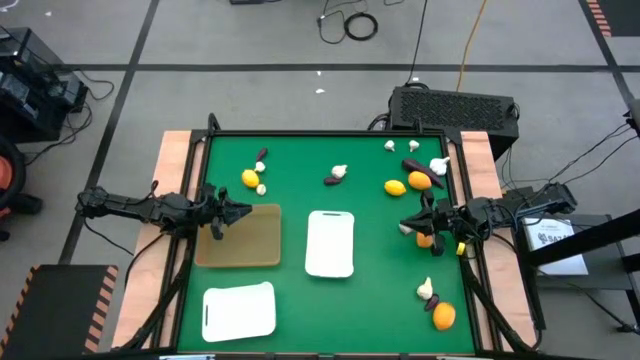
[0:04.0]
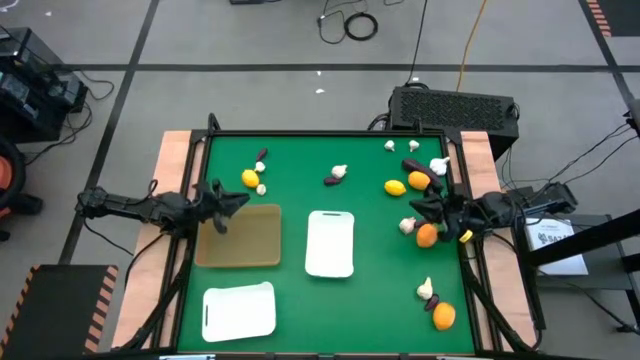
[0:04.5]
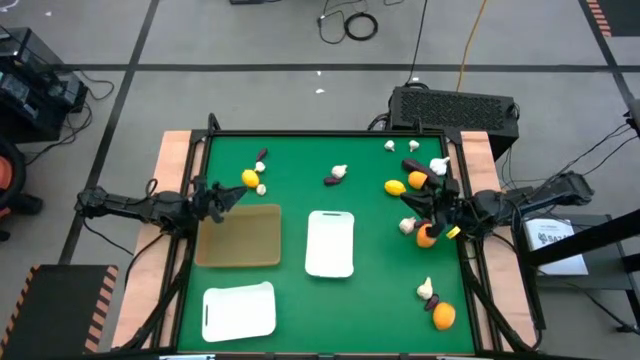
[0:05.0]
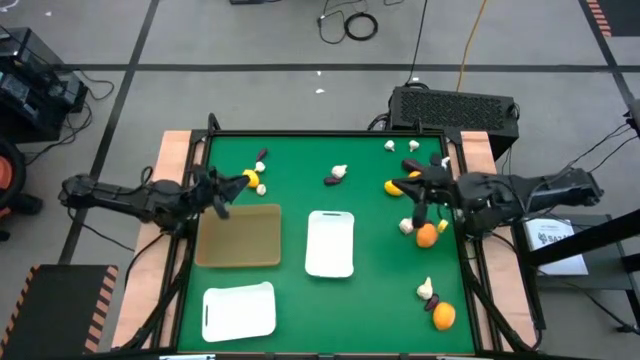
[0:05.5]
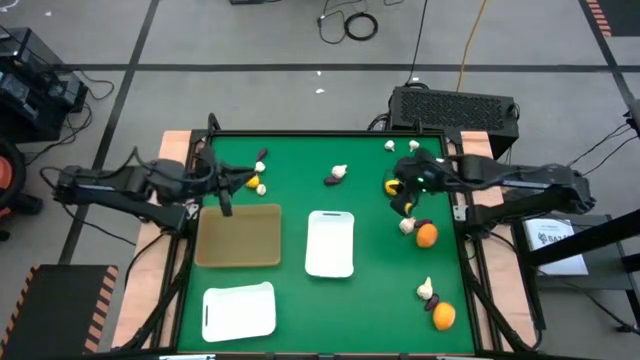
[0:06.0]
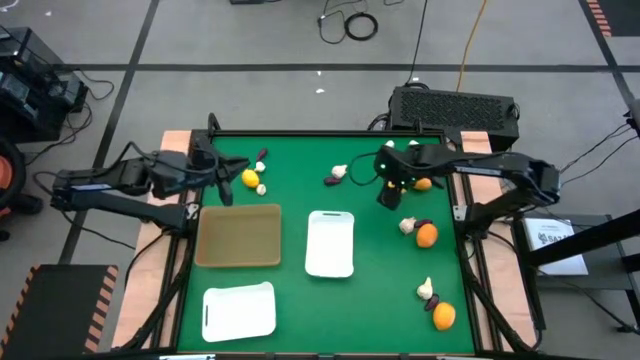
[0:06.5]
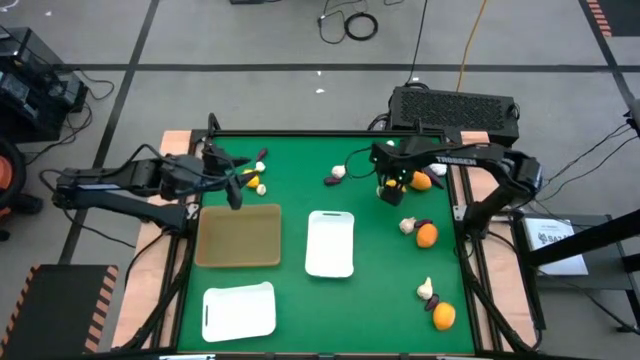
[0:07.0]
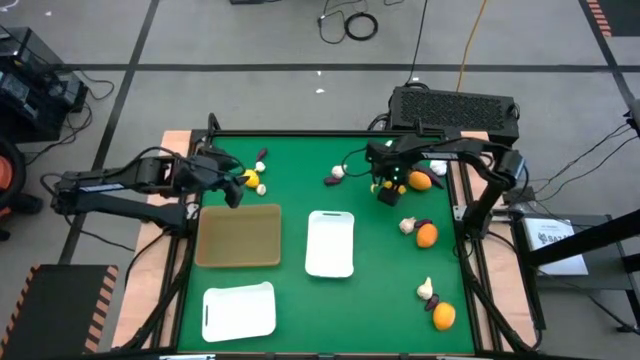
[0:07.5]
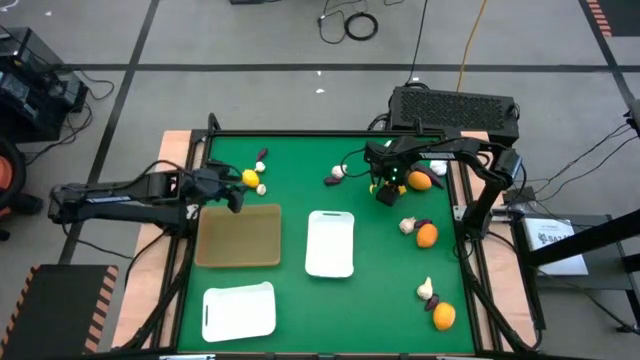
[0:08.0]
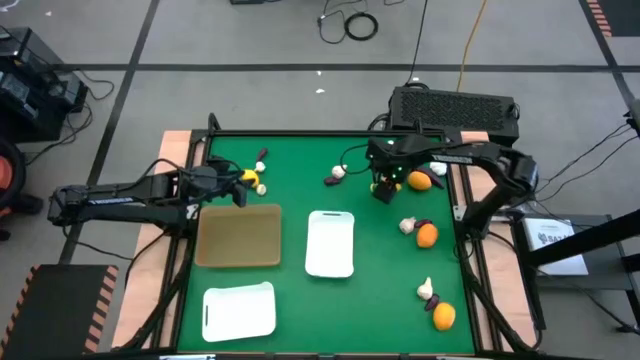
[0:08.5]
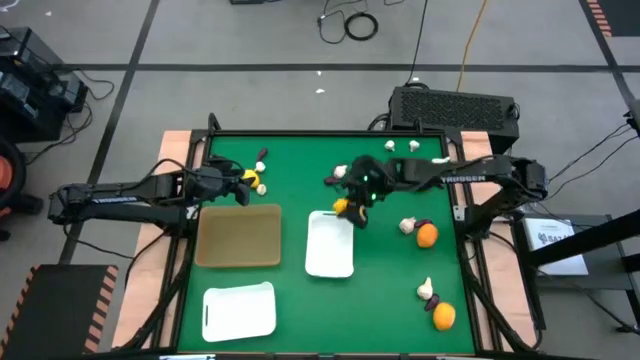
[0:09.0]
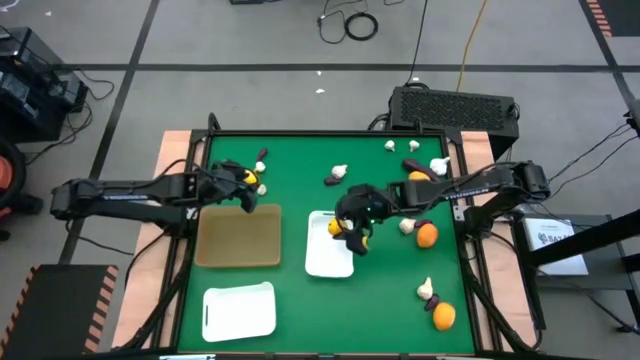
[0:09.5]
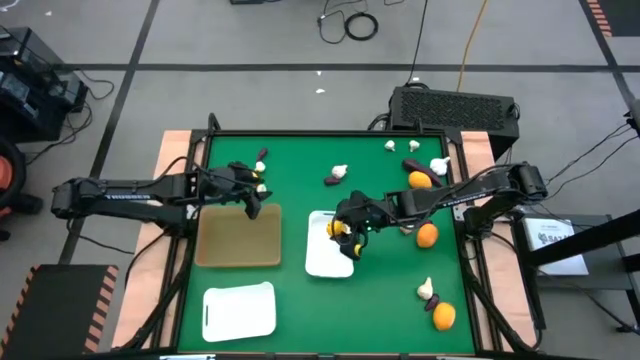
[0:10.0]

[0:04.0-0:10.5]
Task: Sort produce into baskets
Put the yellow lemon into the top white bin

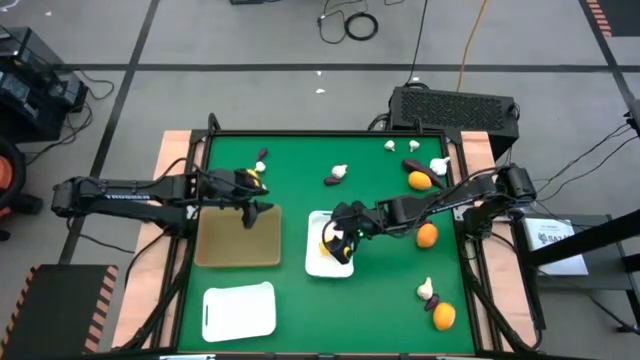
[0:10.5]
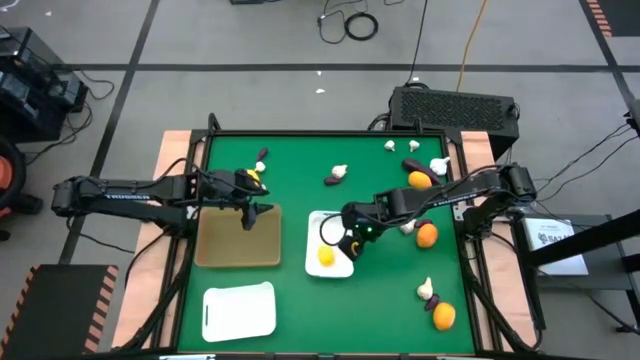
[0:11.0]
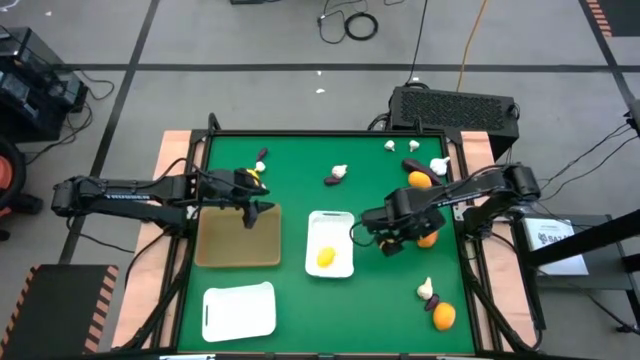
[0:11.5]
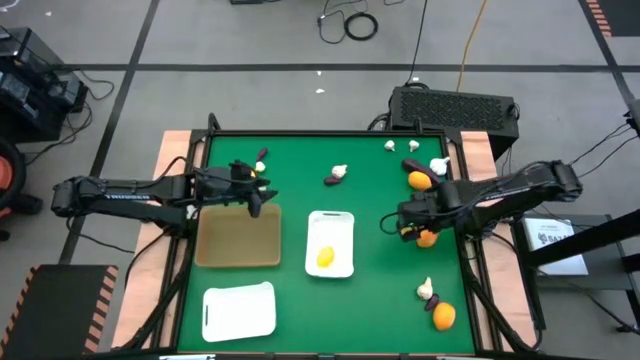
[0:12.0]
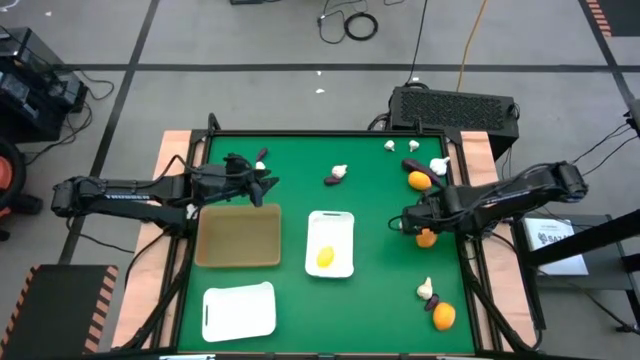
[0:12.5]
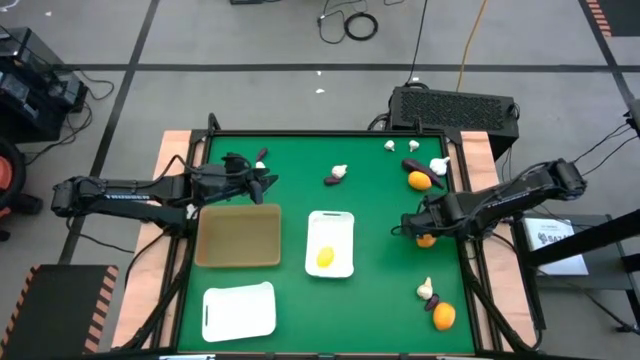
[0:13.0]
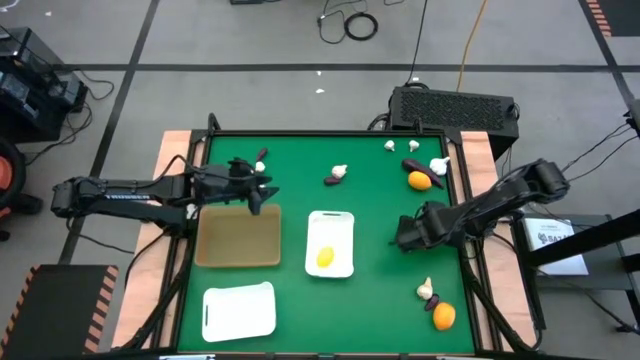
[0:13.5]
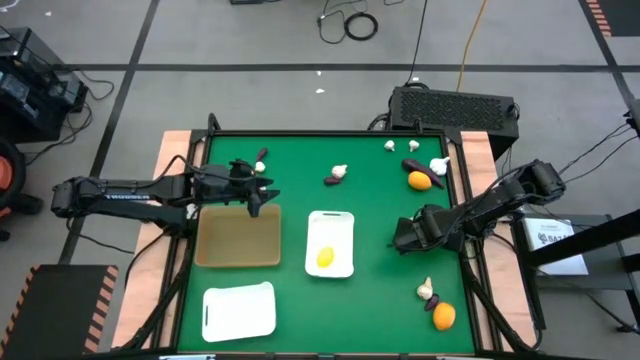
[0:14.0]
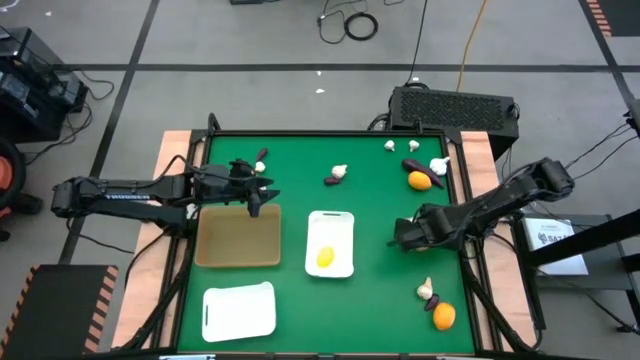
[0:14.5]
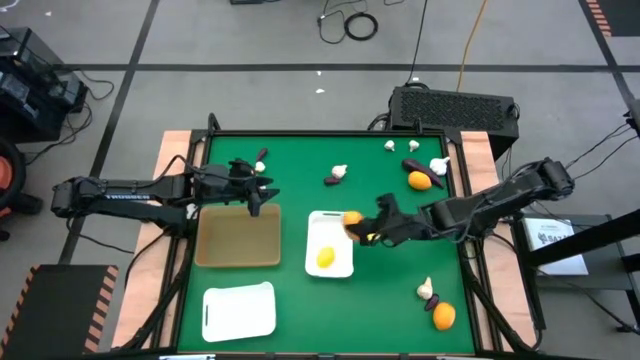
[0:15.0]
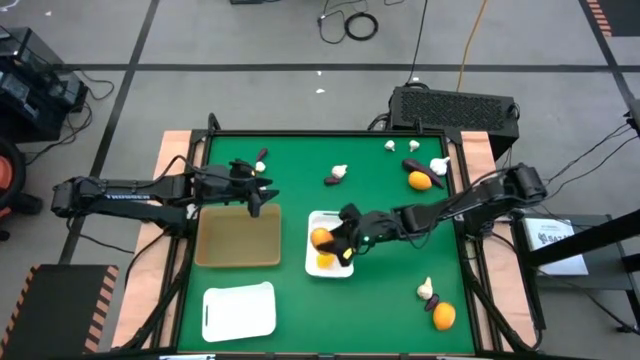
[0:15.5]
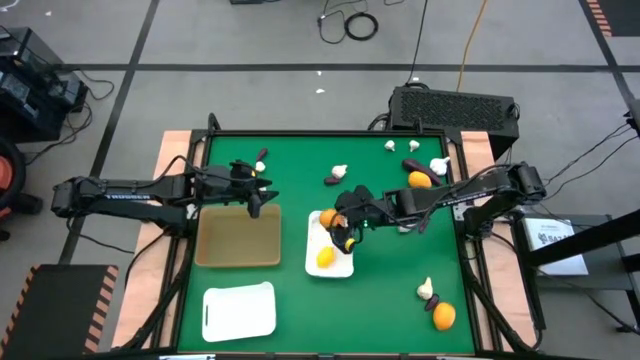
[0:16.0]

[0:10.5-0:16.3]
Put the yellow lemon into the top white bin

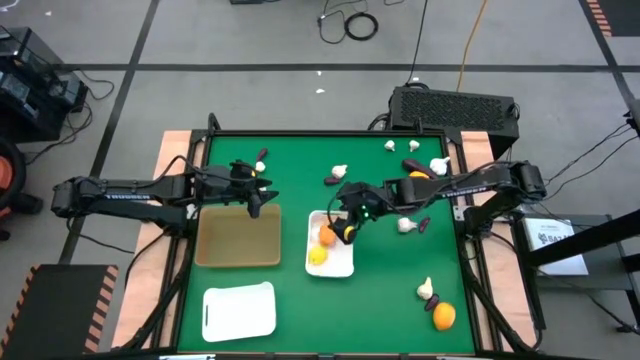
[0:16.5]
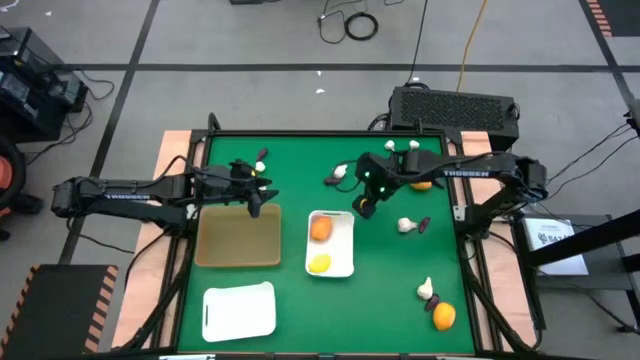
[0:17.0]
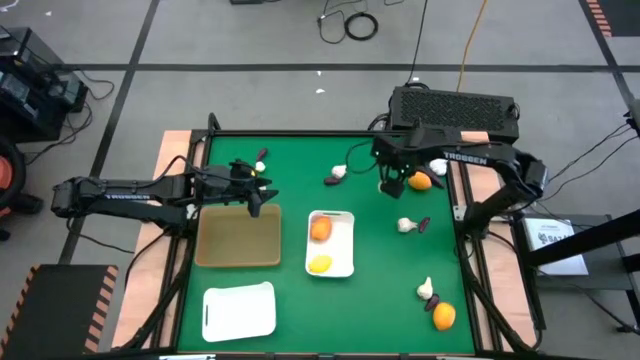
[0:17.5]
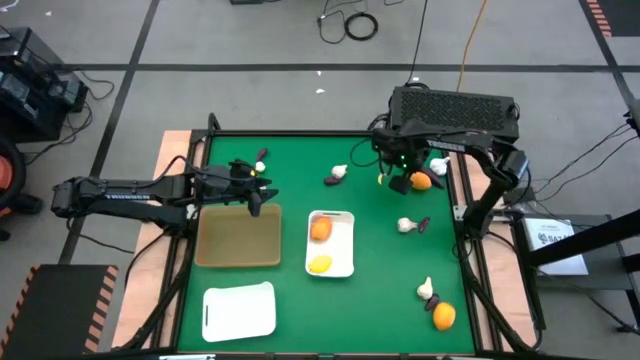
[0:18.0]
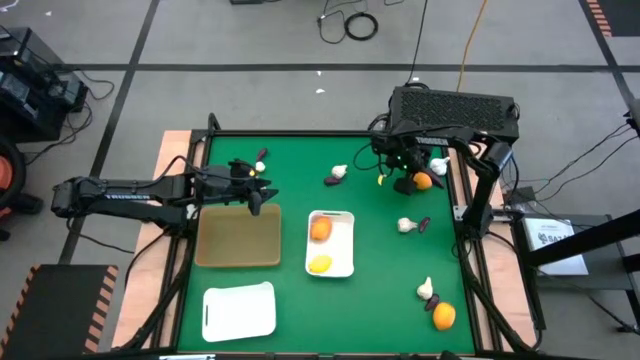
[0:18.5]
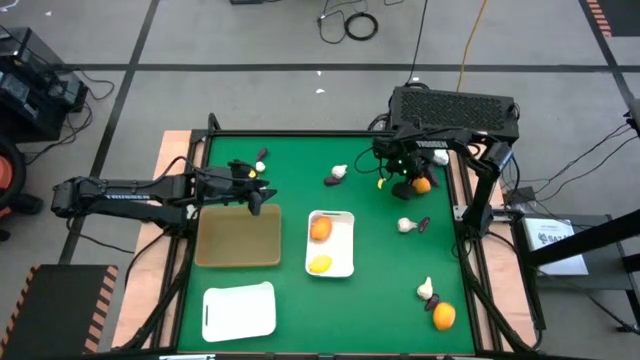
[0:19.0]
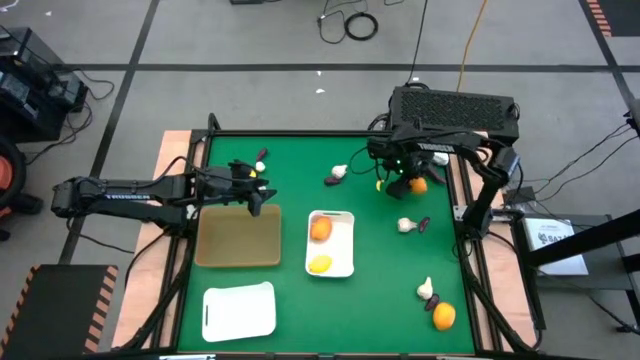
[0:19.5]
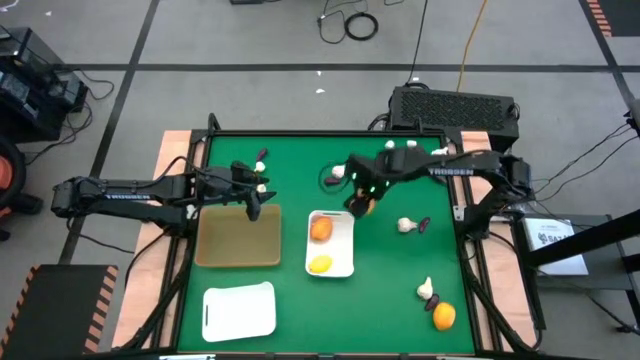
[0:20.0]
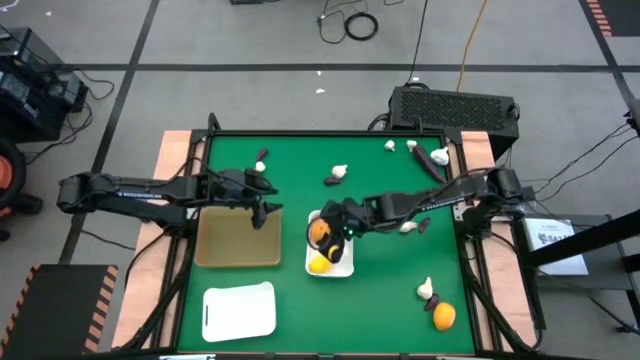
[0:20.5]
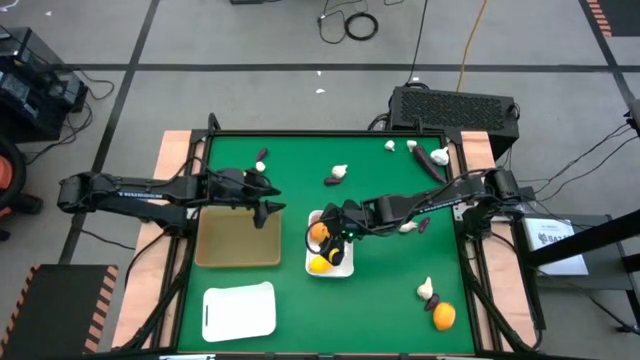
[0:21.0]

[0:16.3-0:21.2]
Put the yellow lemon into the top white bin

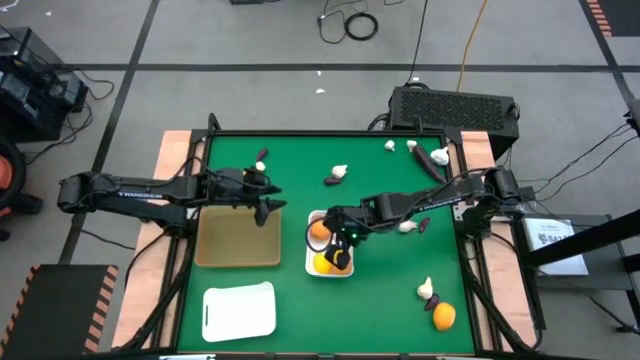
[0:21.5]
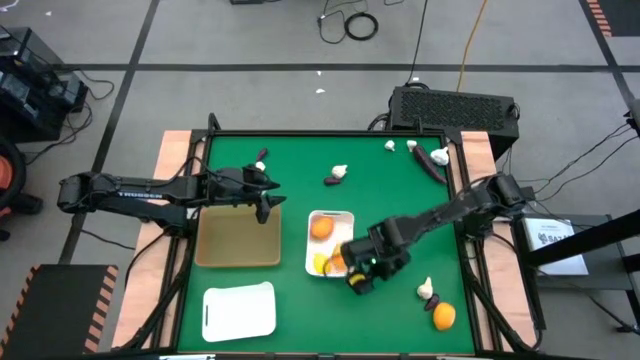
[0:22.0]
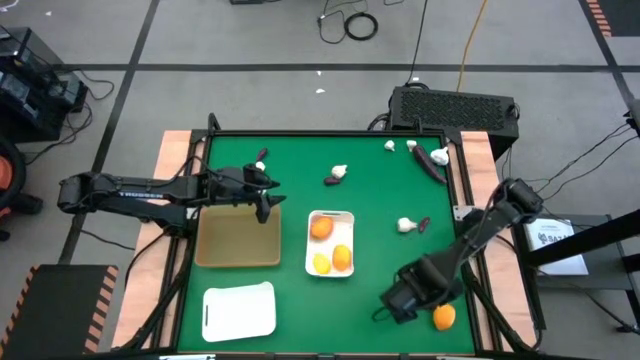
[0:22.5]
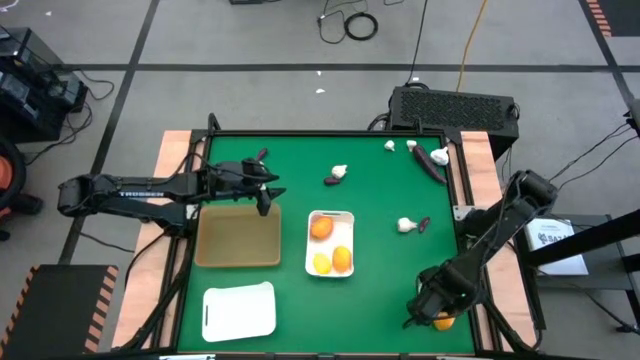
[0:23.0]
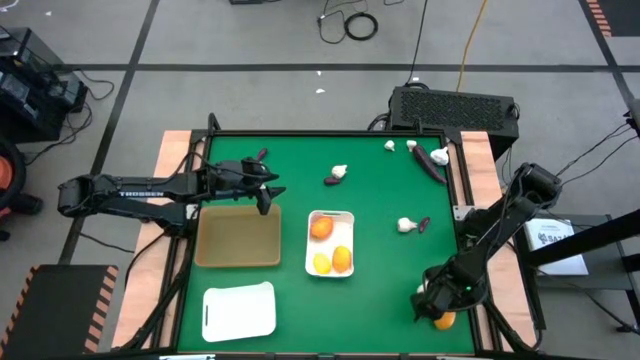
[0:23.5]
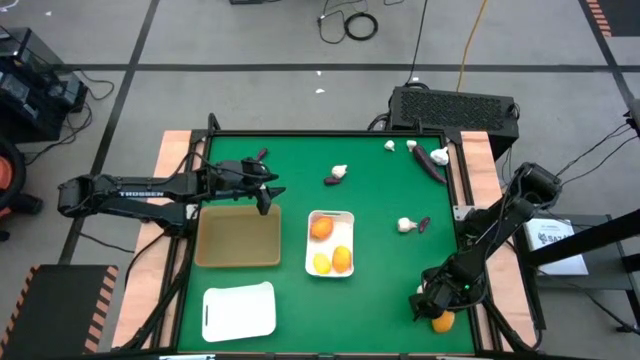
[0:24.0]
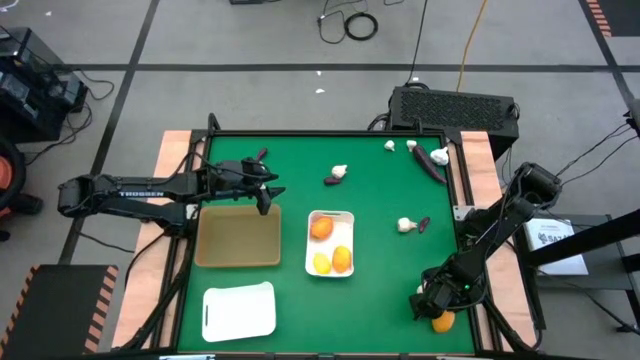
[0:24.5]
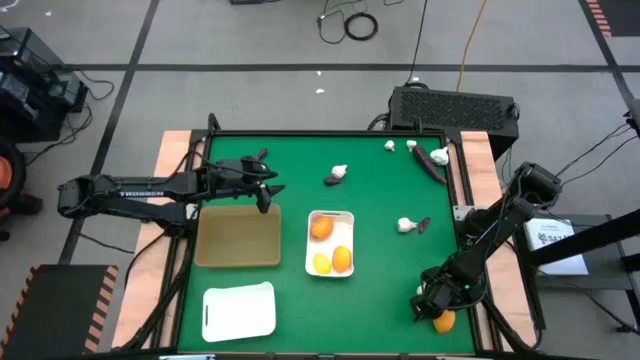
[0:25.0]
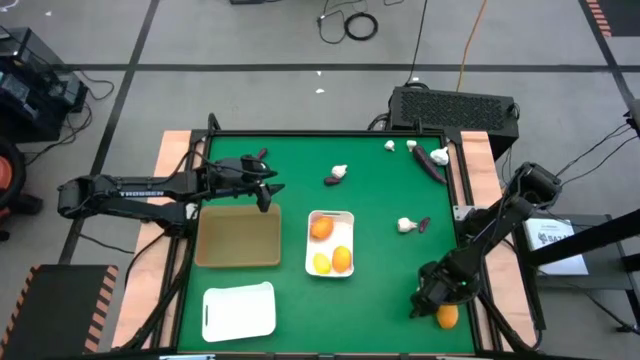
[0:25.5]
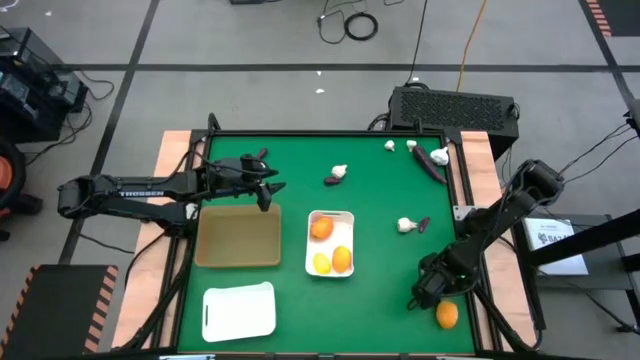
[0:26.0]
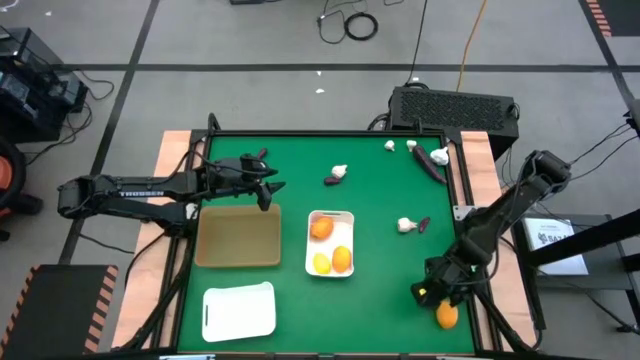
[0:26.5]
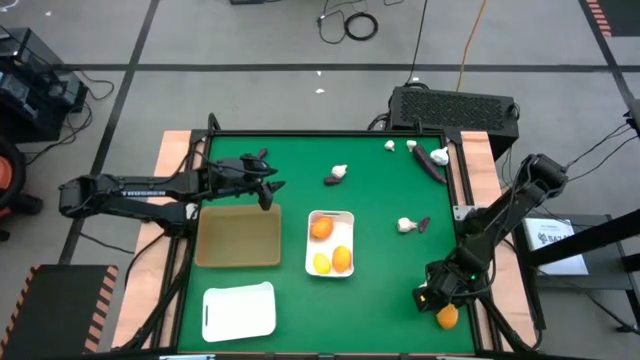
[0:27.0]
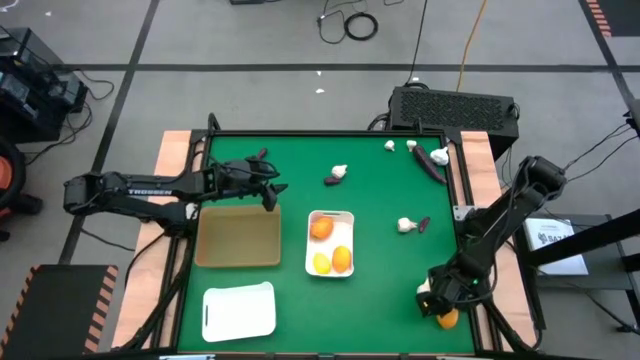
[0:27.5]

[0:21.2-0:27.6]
Put the yellow lemon into the top white bin
